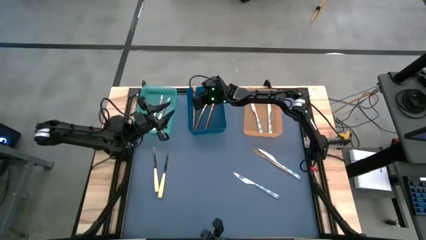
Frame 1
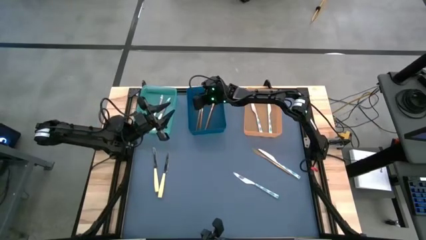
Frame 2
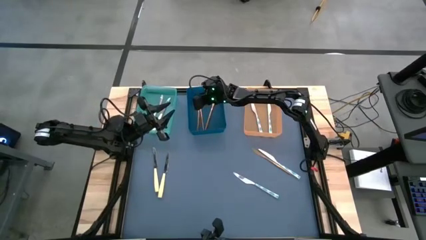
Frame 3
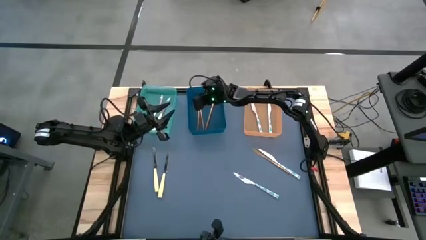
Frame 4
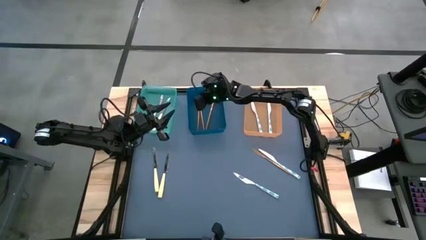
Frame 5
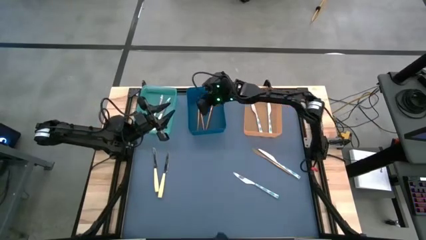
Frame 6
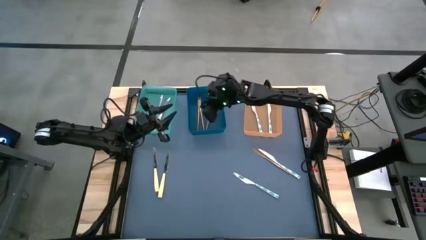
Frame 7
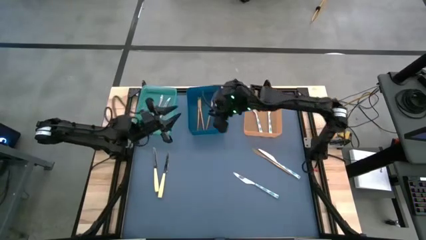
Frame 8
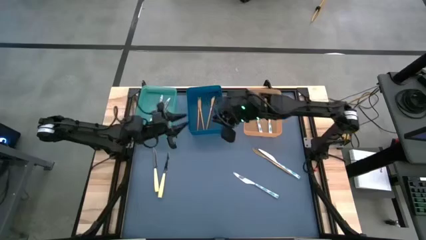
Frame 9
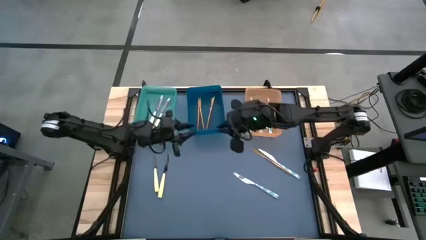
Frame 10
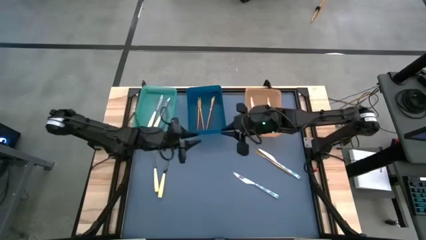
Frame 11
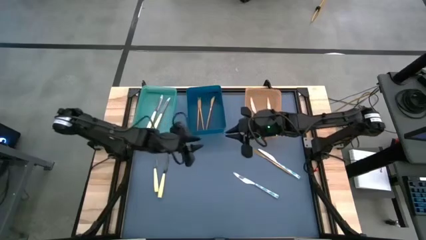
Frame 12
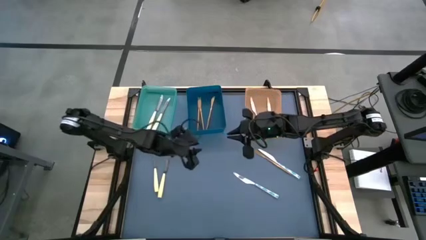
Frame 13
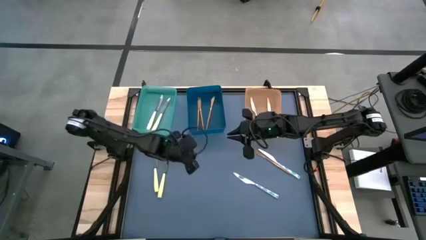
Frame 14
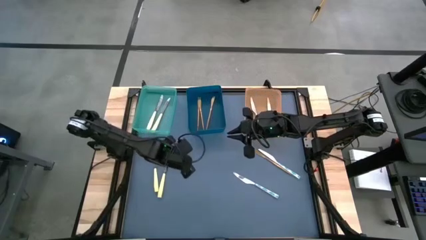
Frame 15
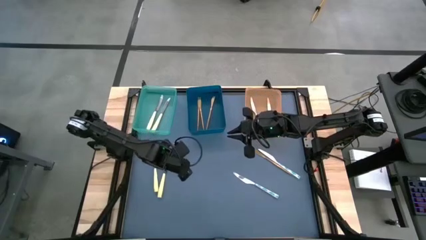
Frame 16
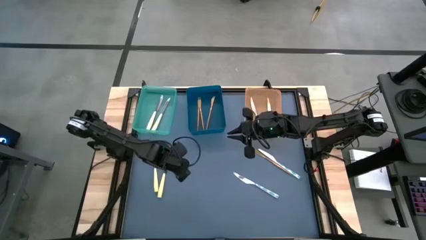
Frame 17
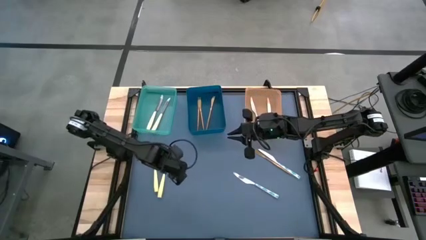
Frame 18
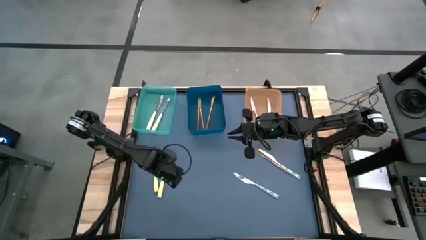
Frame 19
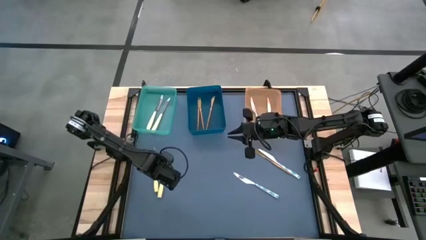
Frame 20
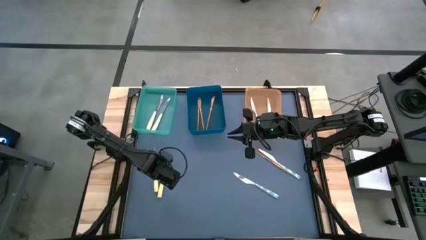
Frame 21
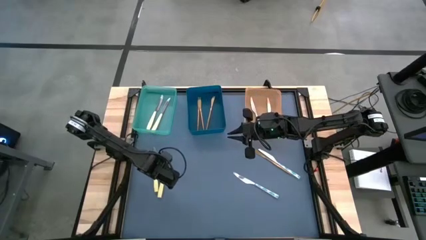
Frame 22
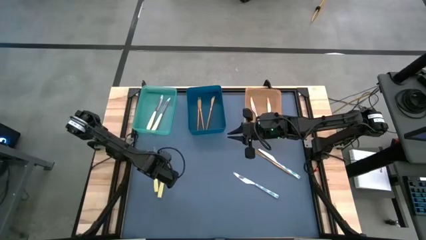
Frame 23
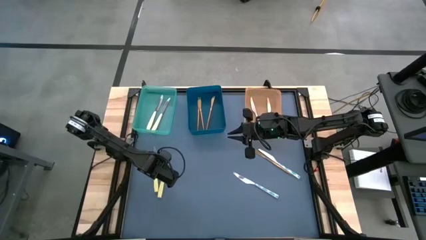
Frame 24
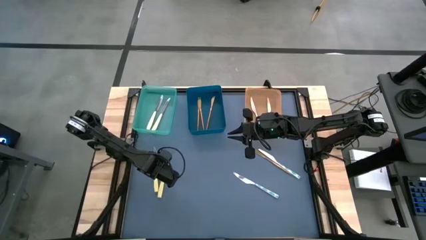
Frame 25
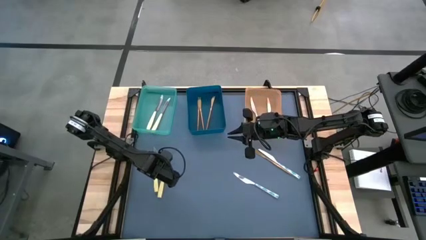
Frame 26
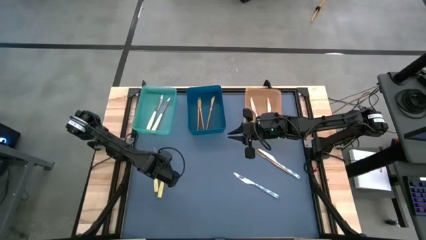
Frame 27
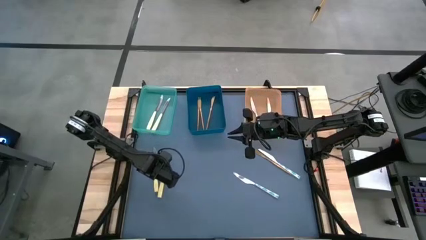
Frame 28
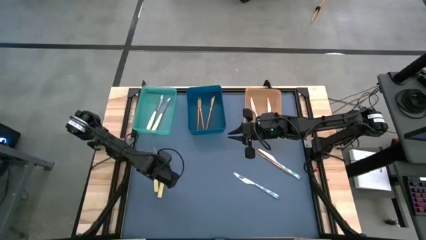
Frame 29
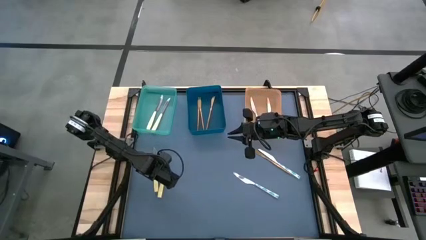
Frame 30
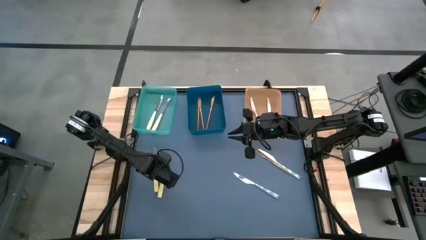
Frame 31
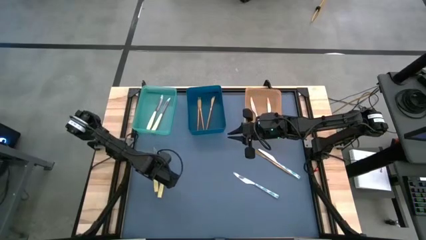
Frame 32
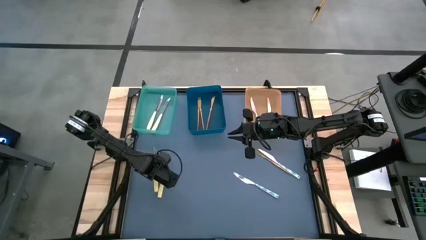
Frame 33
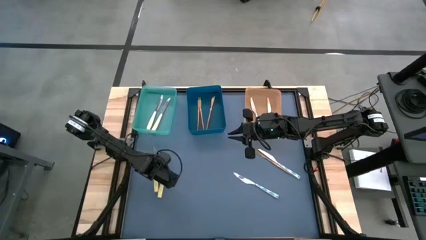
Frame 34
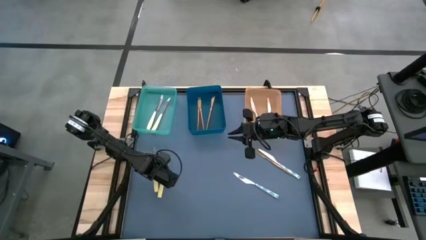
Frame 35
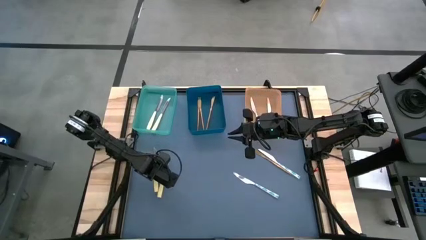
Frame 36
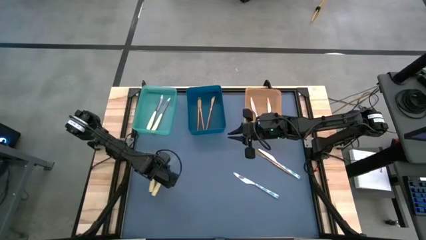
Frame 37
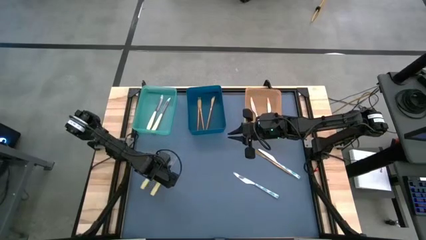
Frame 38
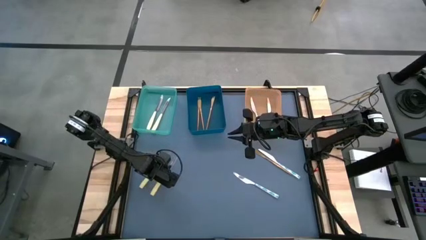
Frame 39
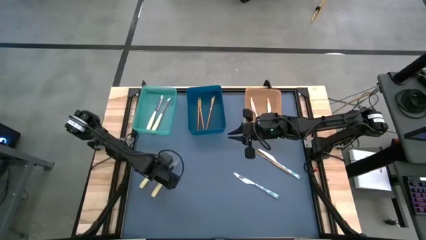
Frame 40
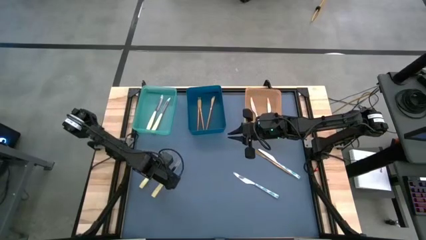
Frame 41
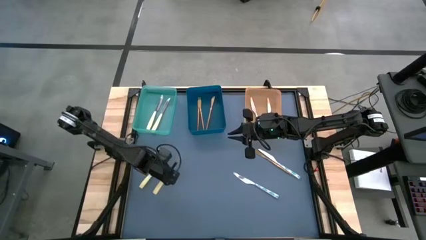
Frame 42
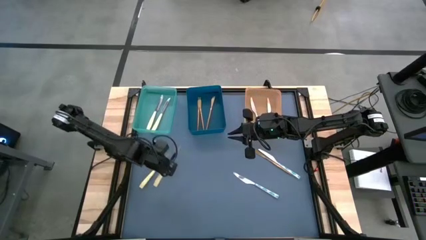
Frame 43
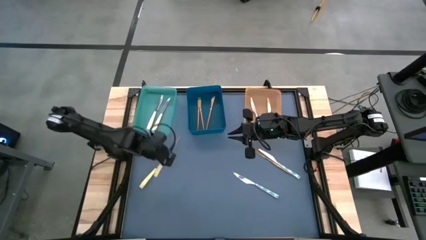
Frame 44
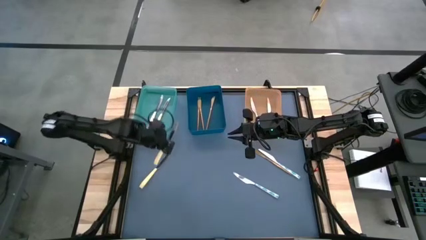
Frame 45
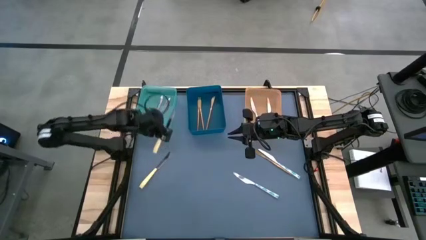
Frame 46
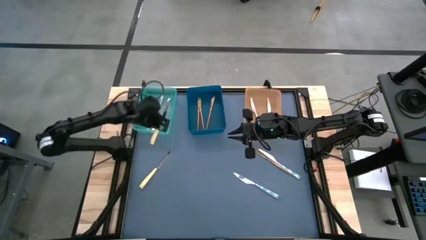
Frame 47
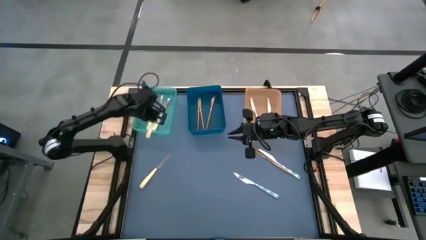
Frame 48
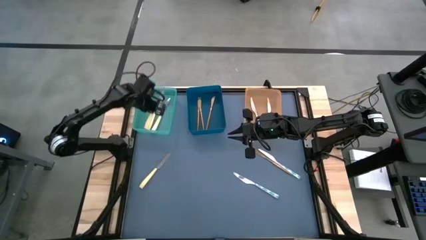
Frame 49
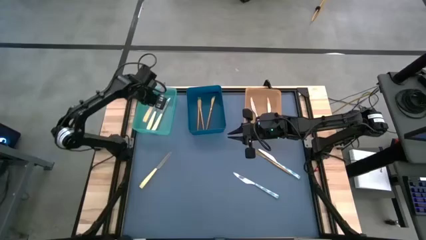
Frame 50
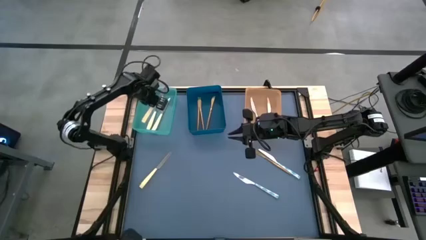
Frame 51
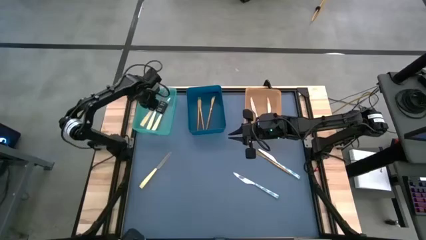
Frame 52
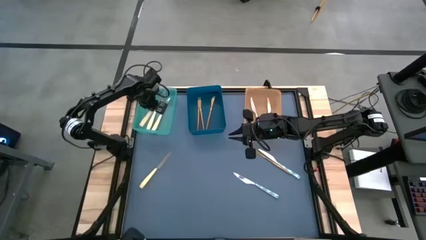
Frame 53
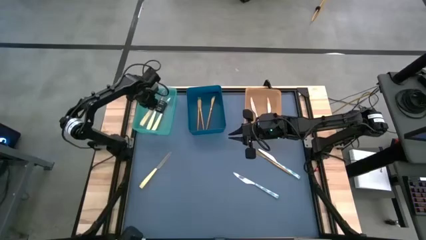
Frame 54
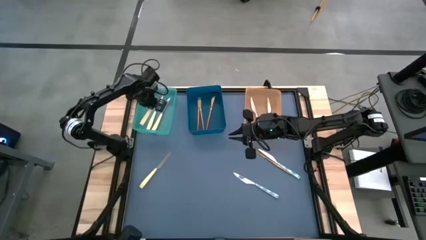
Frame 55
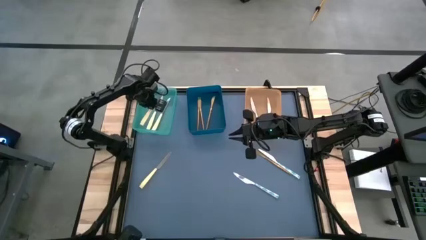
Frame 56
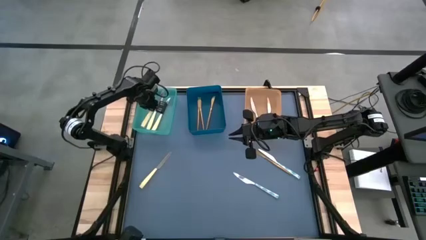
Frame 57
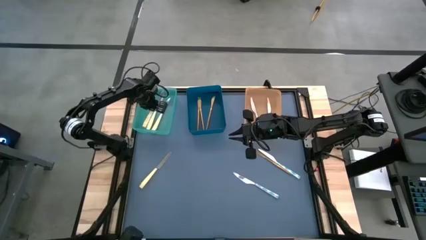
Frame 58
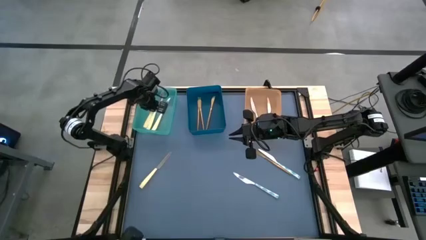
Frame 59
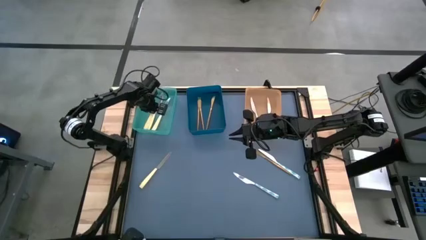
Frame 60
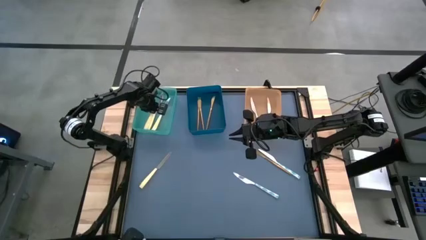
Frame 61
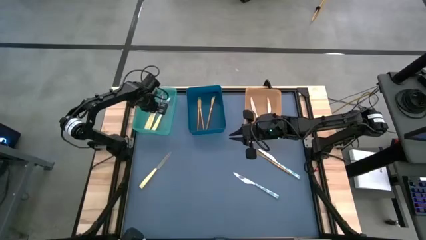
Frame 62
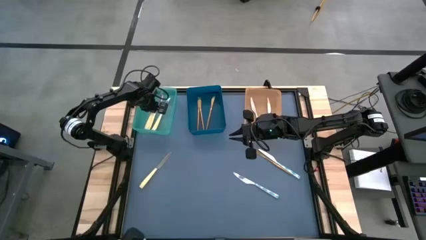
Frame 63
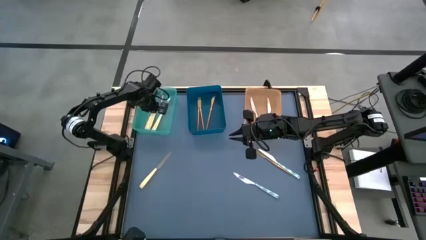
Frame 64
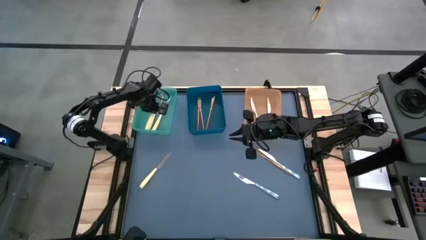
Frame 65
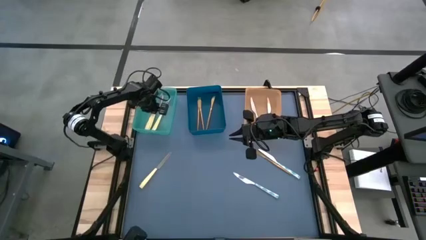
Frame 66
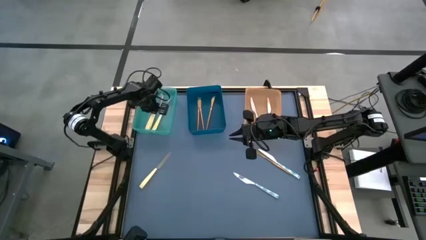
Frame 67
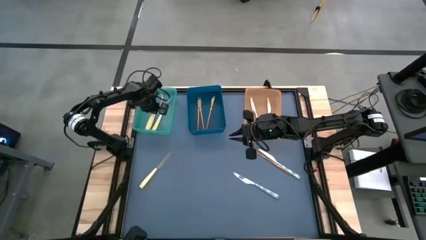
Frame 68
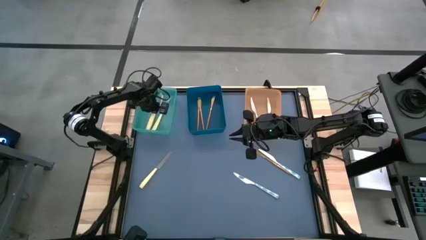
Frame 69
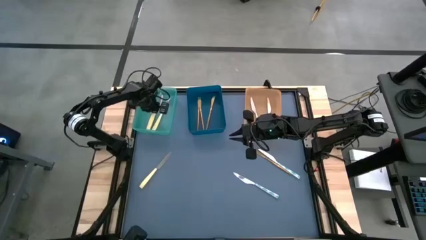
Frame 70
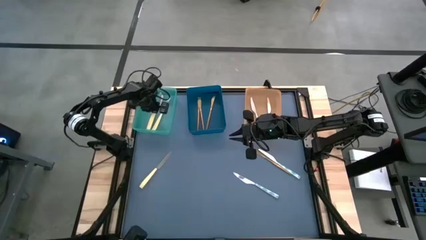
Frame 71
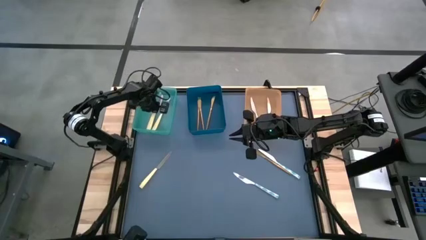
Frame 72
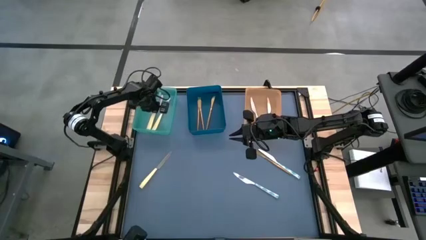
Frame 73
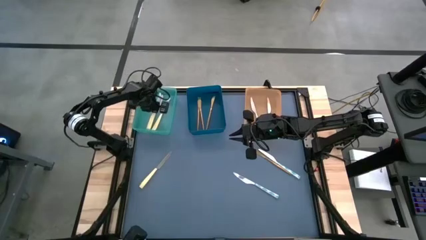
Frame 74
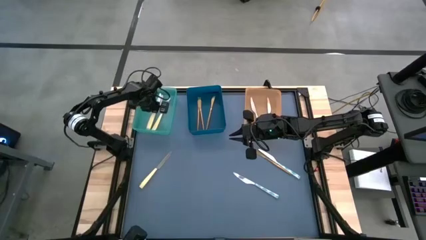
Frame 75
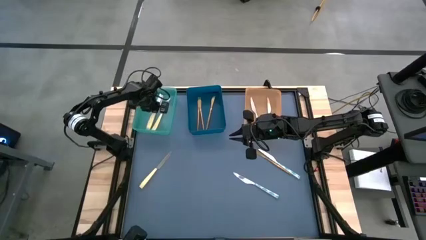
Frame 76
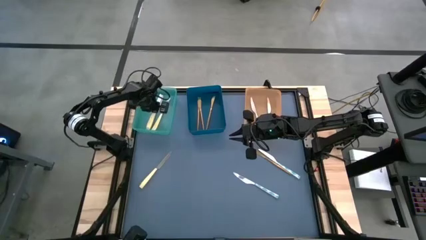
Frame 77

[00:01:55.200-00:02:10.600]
Task: Sort silverware by color (type)
Put the yellow knife into the green bin
